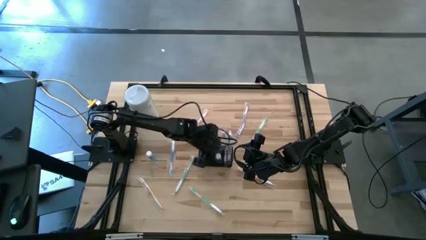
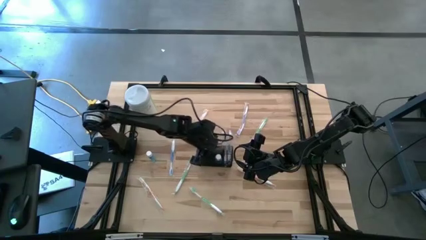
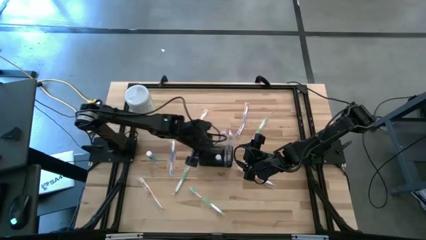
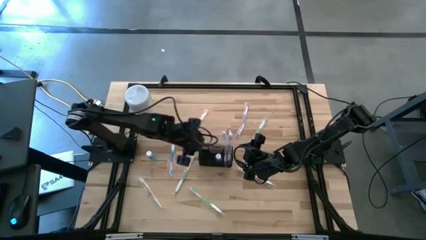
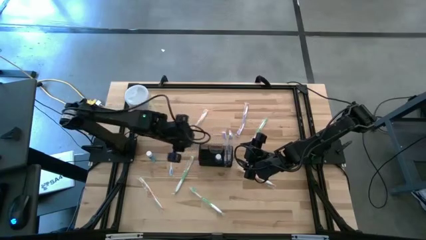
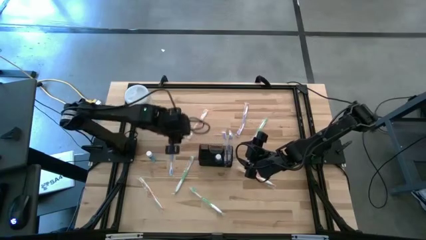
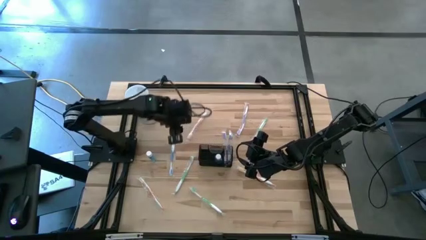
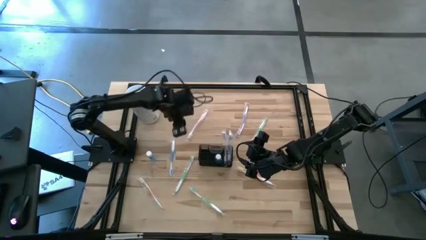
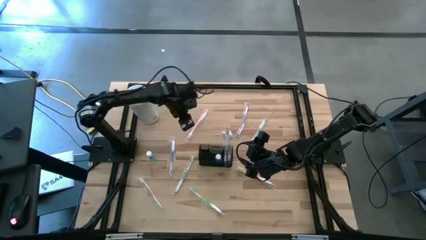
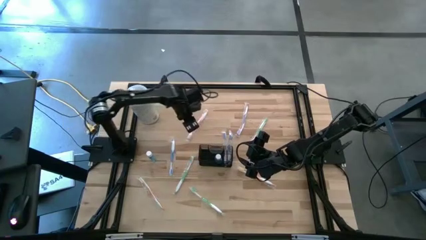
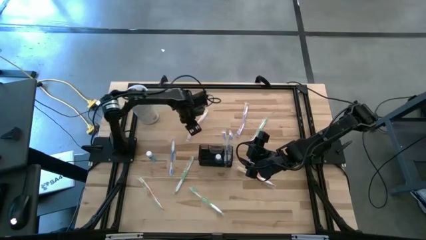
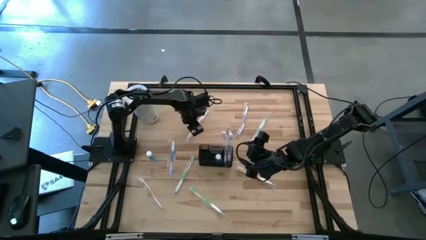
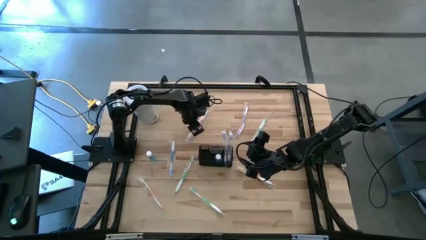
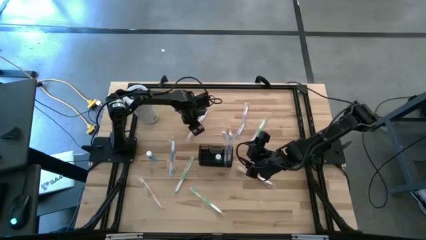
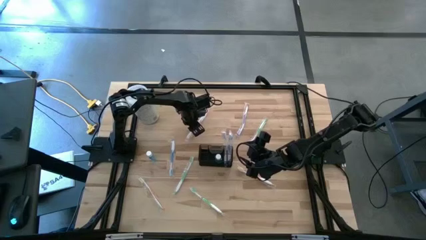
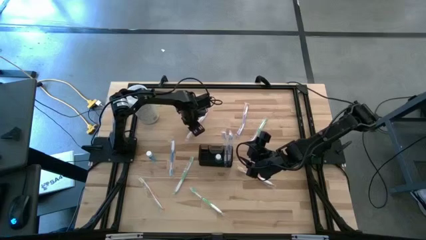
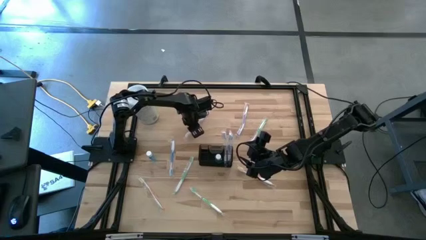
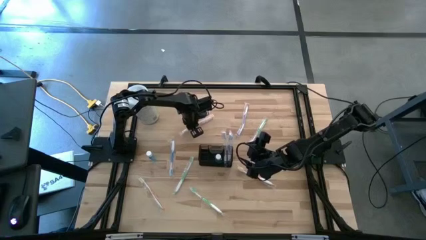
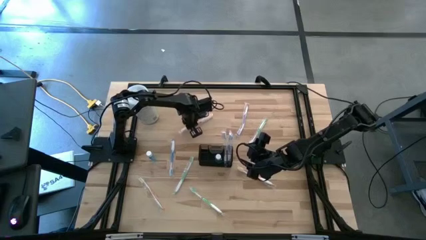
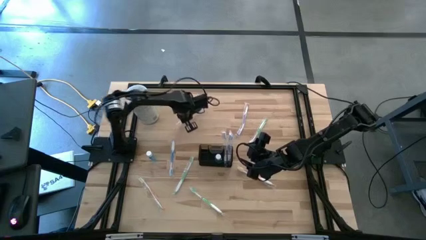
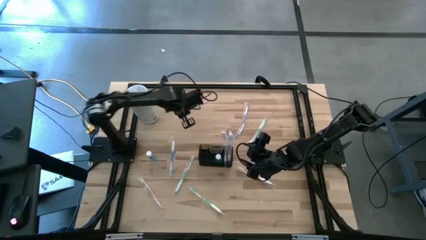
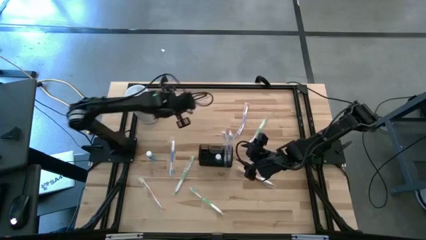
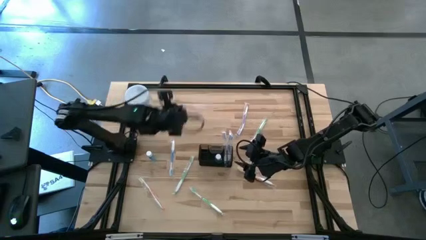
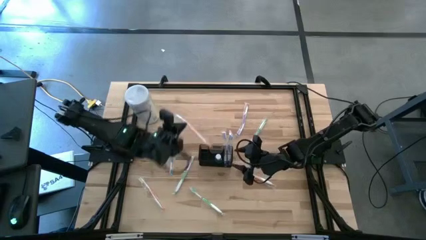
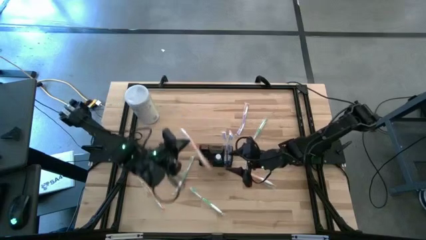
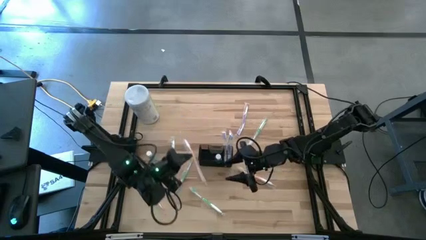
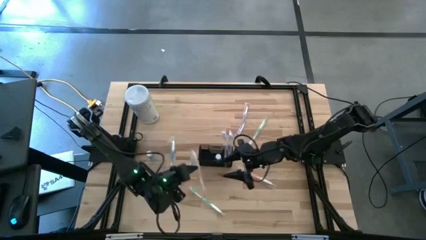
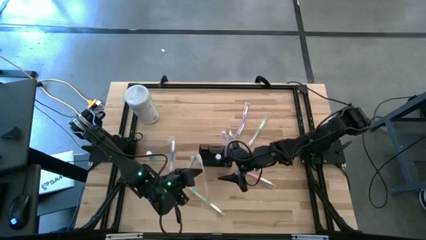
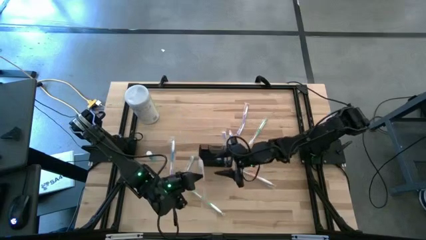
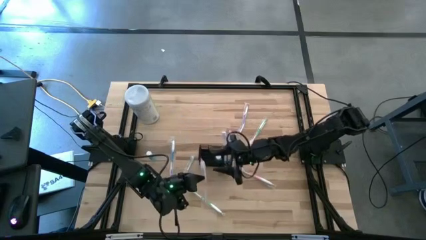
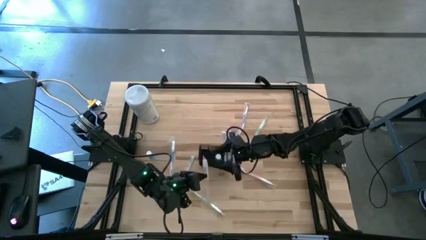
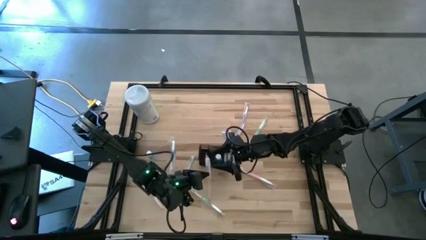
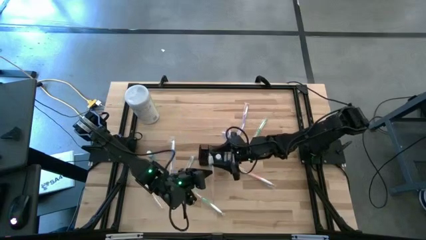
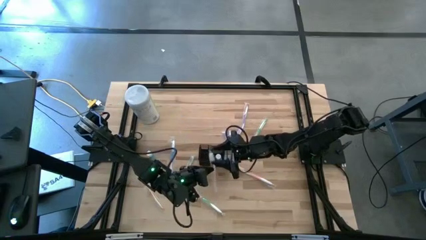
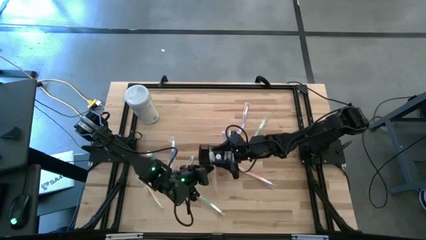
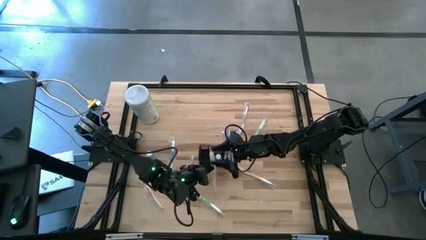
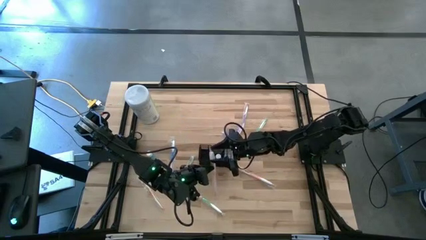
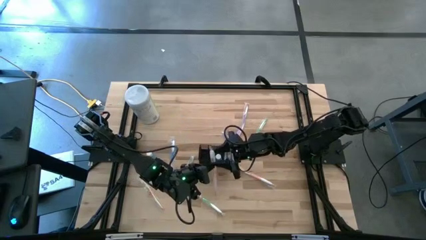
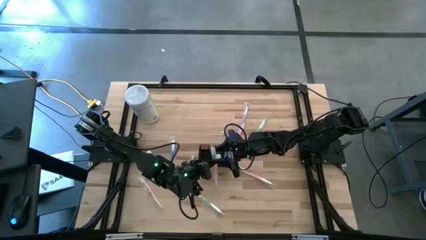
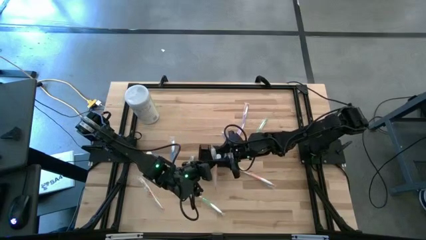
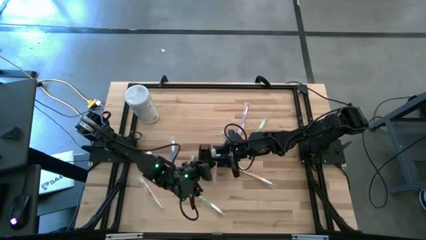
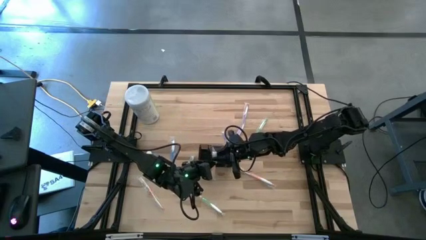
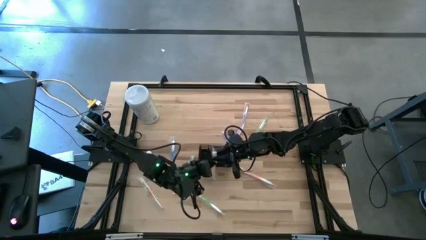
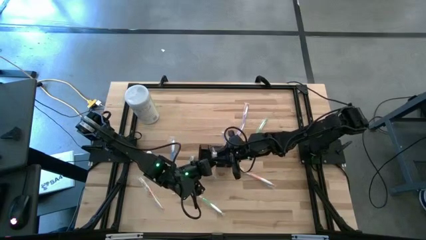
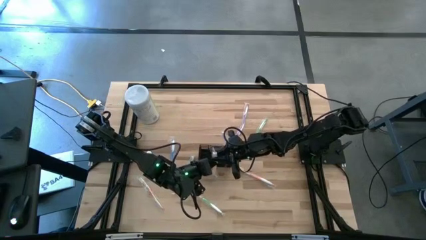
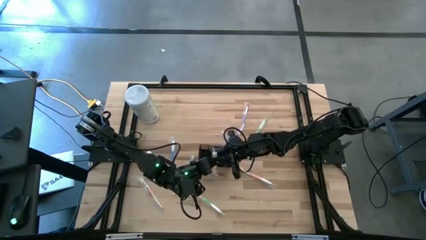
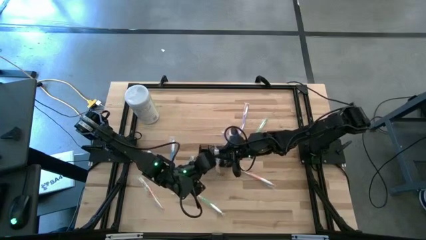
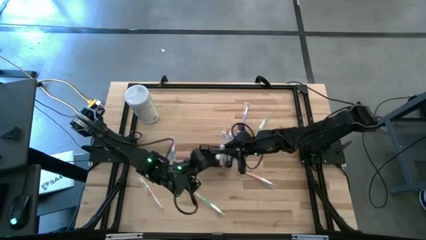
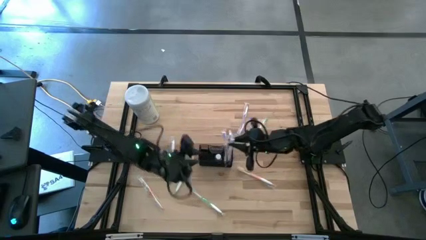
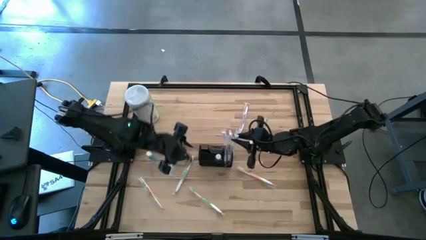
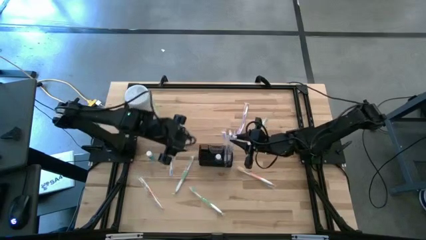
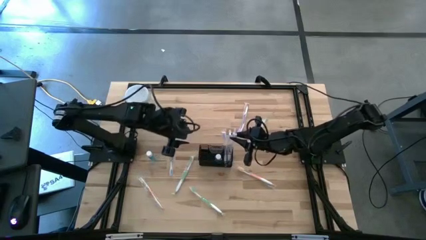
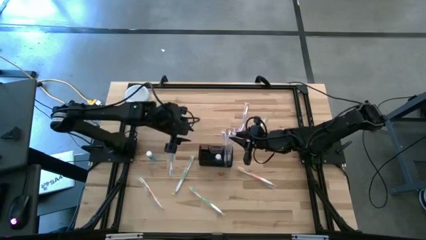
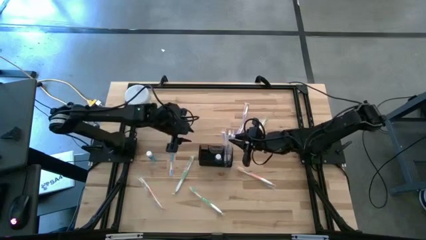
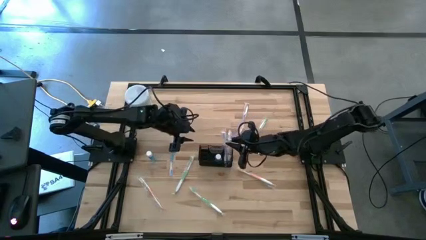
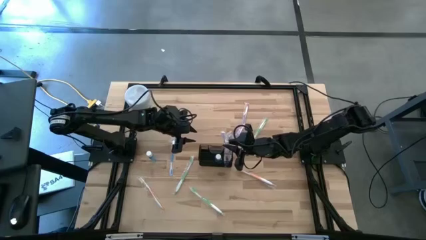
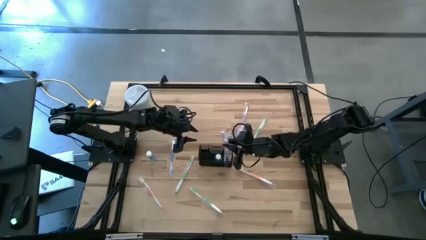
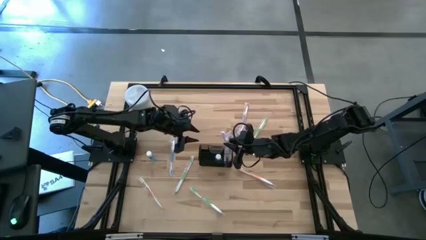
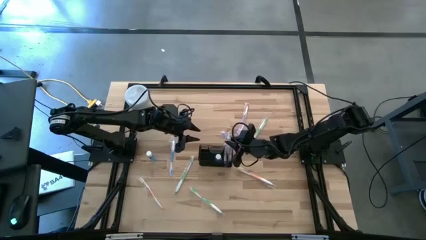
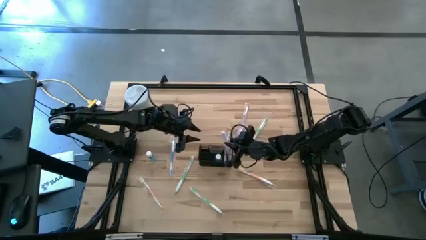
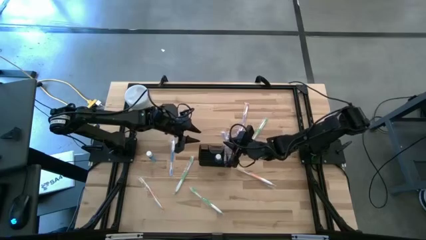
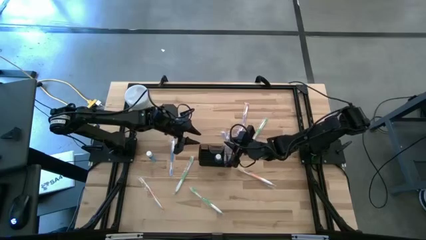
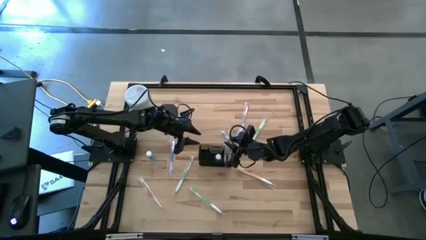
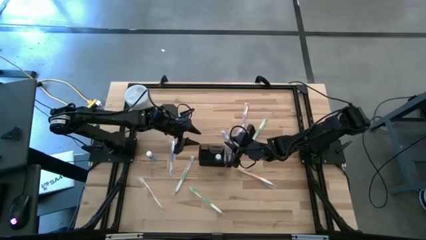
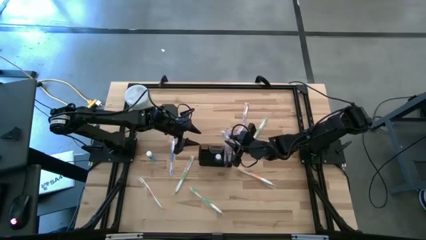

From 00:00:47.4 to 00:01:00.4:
Task: Pick & Place toothbrushing station
Put the top orange toothbrush into the black mesh
